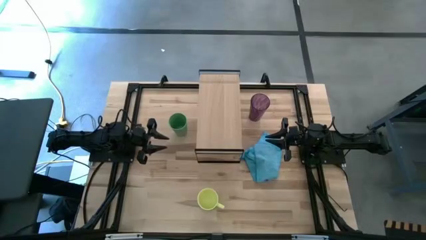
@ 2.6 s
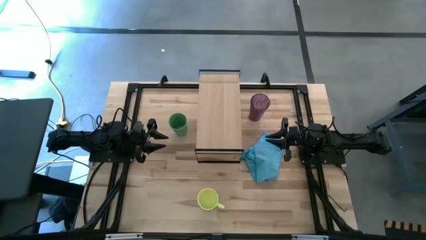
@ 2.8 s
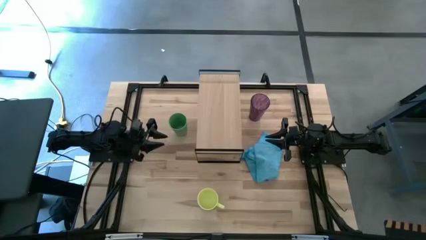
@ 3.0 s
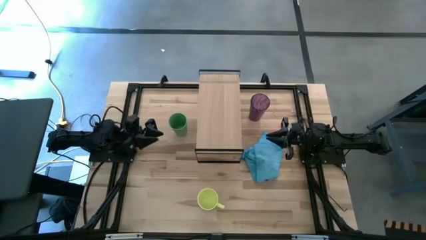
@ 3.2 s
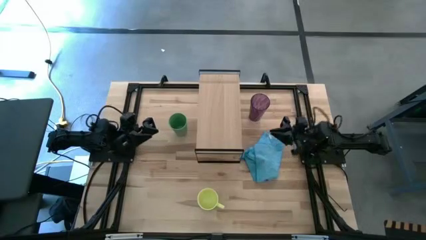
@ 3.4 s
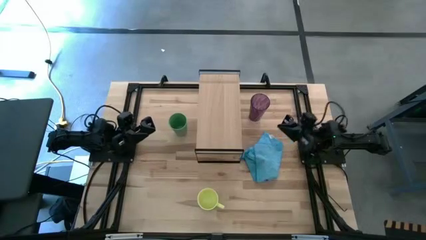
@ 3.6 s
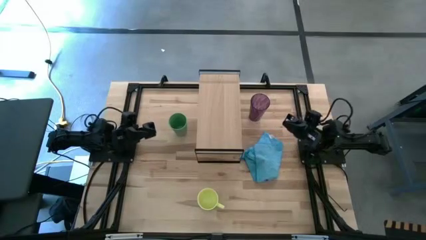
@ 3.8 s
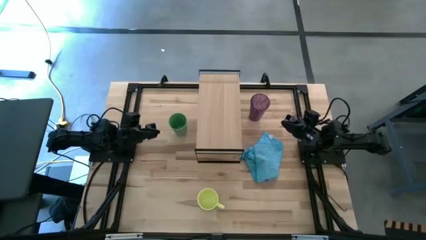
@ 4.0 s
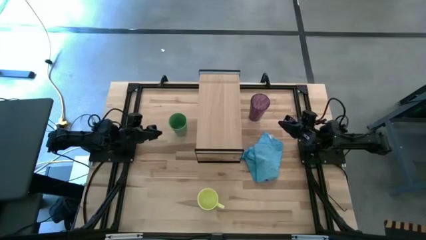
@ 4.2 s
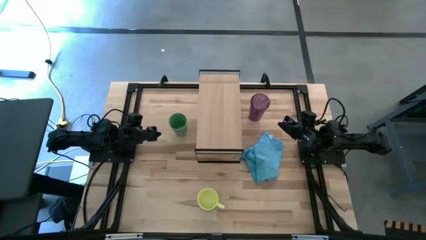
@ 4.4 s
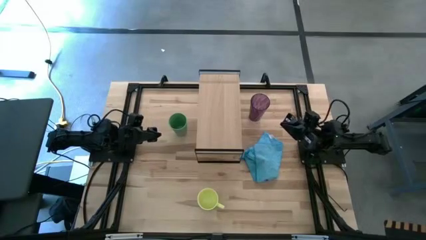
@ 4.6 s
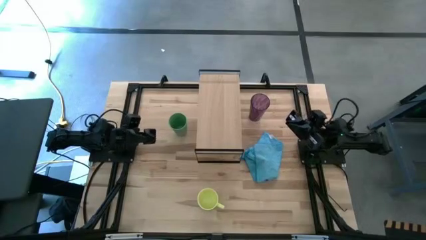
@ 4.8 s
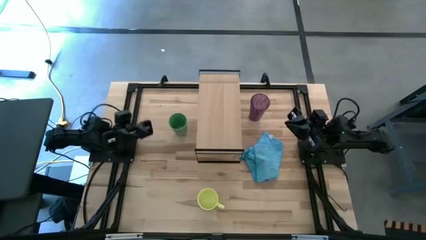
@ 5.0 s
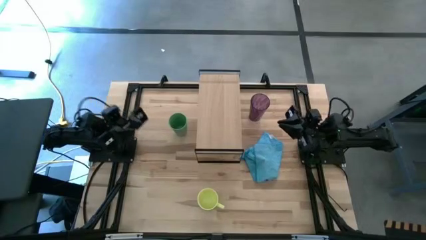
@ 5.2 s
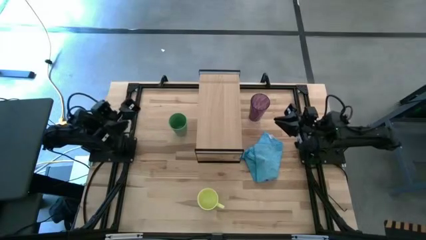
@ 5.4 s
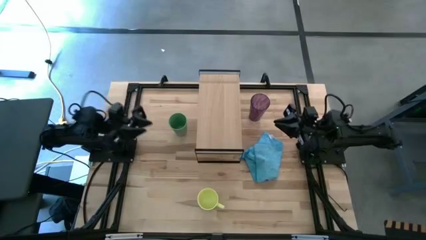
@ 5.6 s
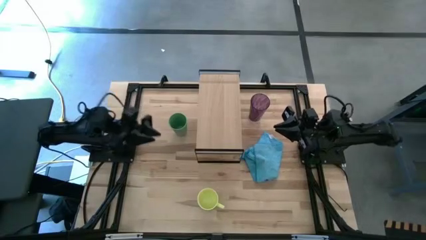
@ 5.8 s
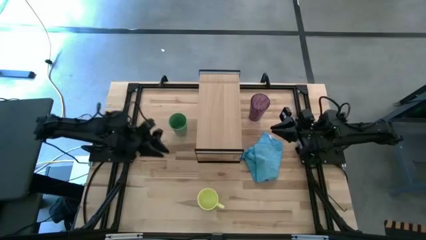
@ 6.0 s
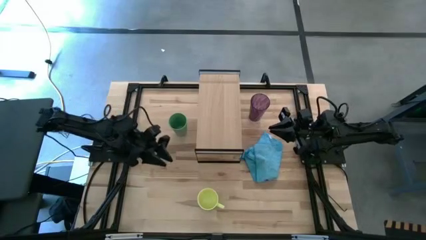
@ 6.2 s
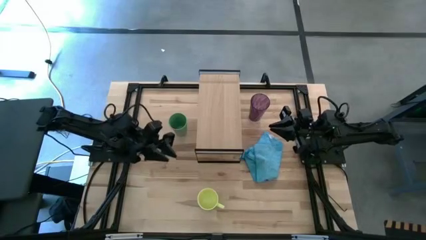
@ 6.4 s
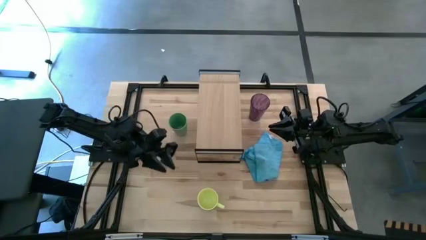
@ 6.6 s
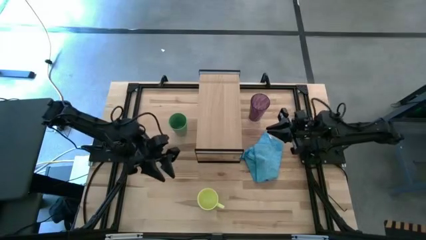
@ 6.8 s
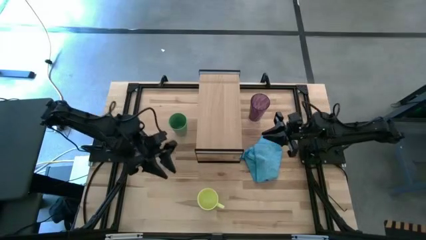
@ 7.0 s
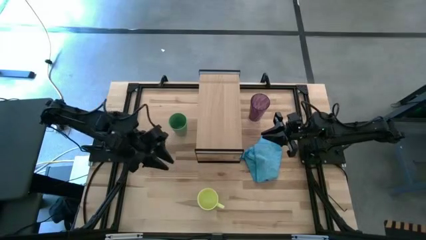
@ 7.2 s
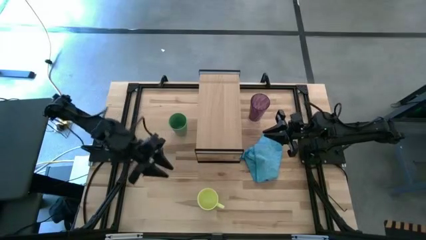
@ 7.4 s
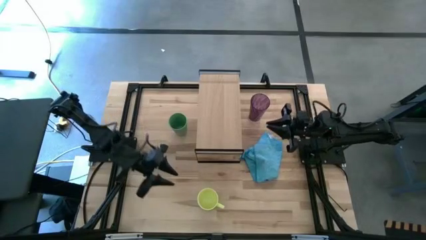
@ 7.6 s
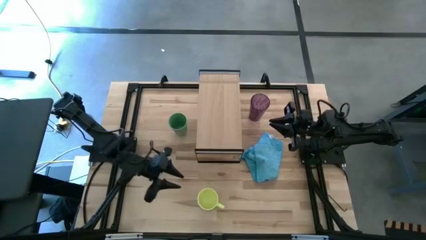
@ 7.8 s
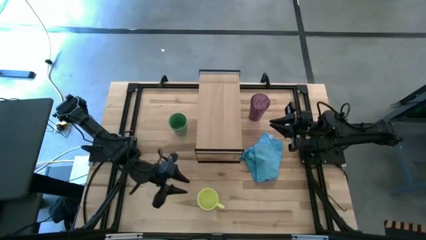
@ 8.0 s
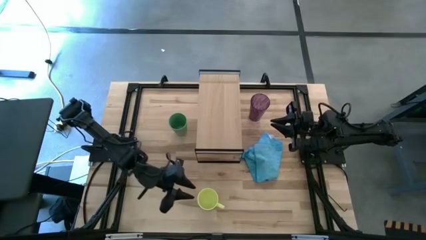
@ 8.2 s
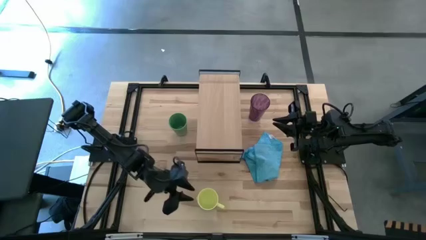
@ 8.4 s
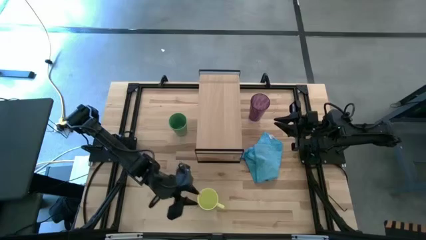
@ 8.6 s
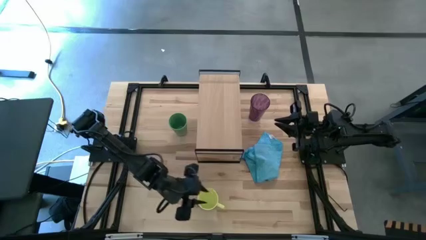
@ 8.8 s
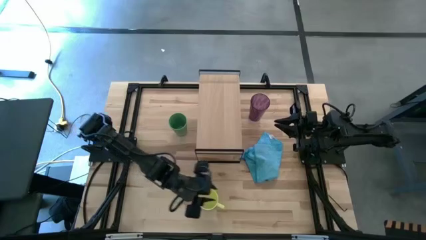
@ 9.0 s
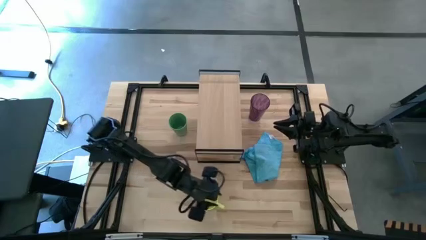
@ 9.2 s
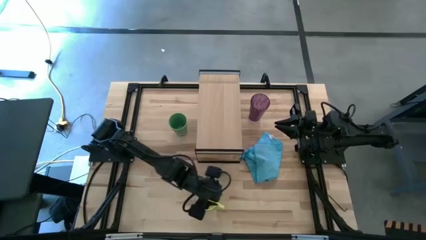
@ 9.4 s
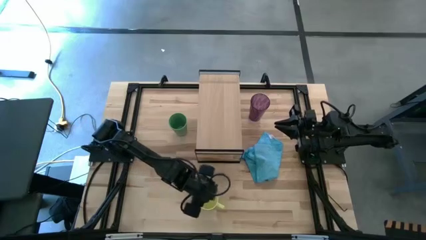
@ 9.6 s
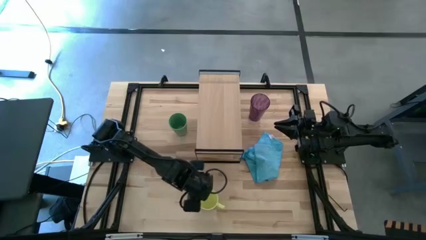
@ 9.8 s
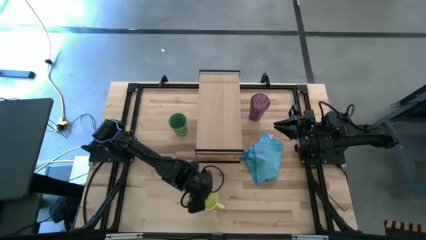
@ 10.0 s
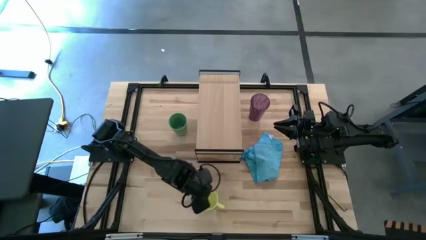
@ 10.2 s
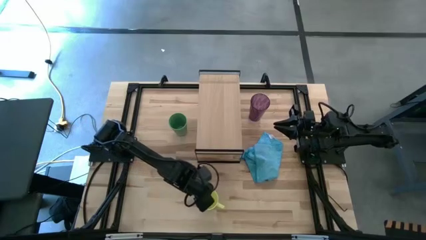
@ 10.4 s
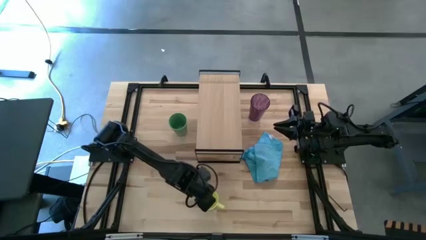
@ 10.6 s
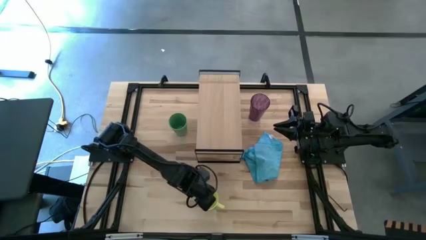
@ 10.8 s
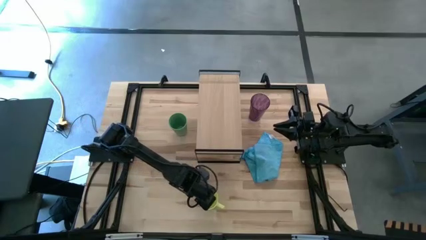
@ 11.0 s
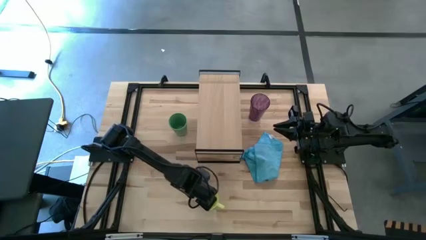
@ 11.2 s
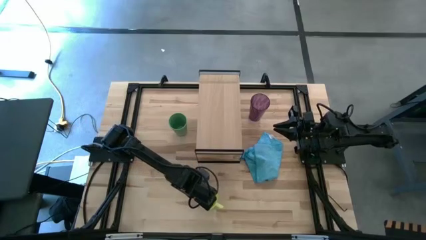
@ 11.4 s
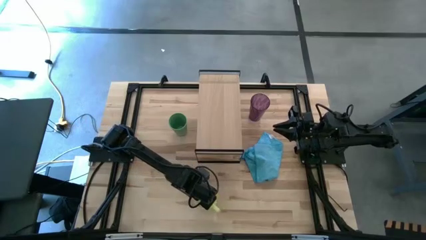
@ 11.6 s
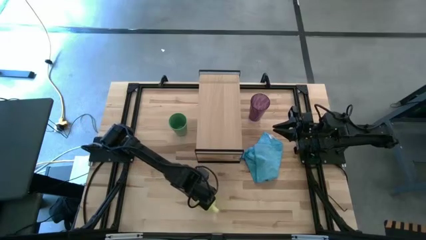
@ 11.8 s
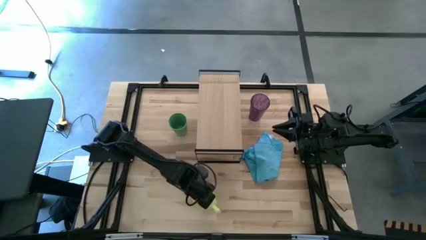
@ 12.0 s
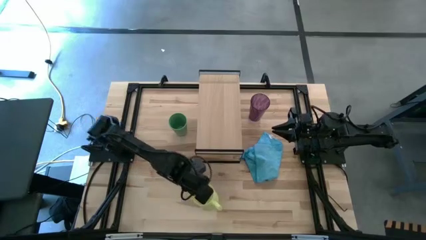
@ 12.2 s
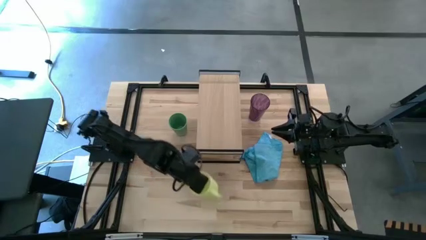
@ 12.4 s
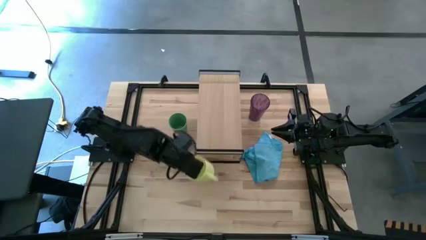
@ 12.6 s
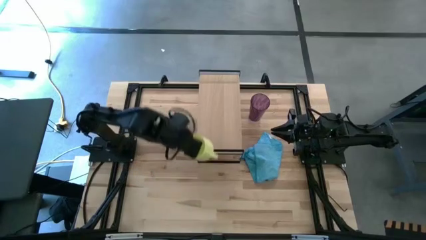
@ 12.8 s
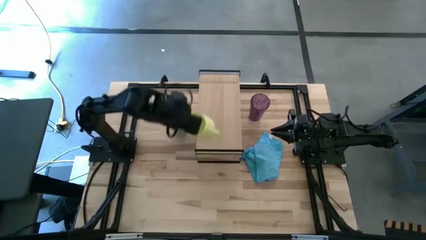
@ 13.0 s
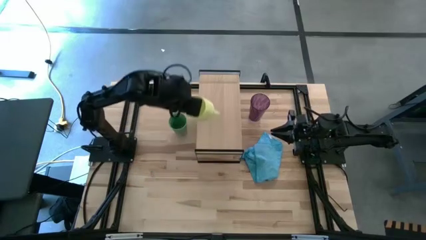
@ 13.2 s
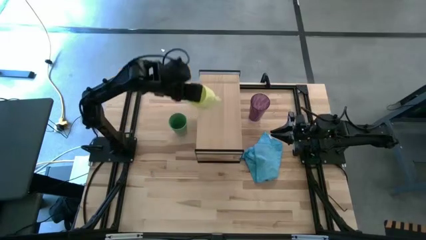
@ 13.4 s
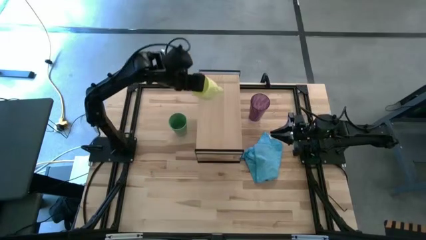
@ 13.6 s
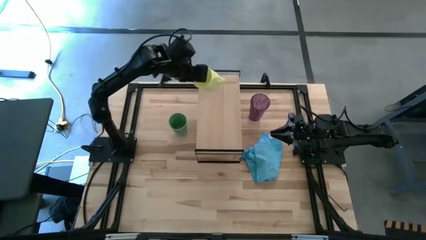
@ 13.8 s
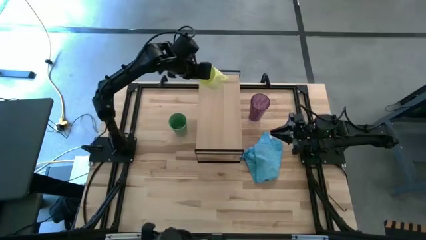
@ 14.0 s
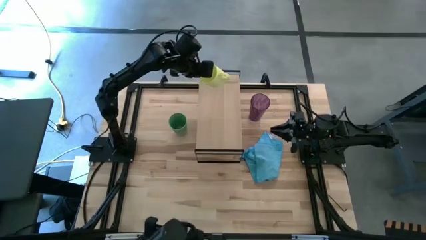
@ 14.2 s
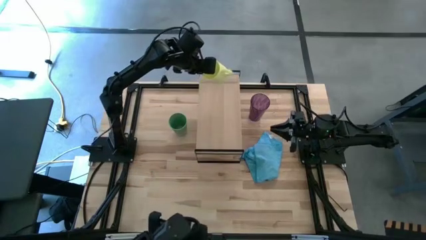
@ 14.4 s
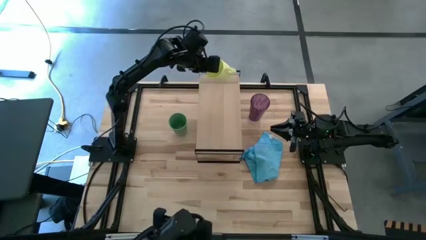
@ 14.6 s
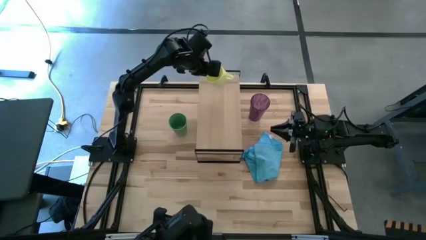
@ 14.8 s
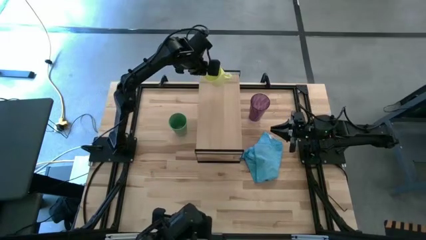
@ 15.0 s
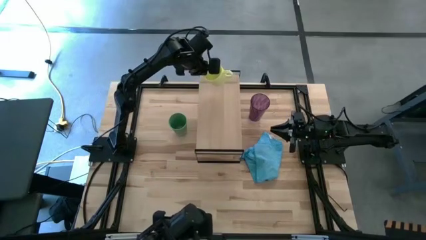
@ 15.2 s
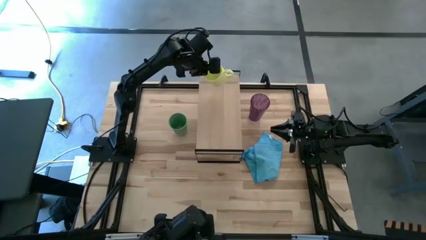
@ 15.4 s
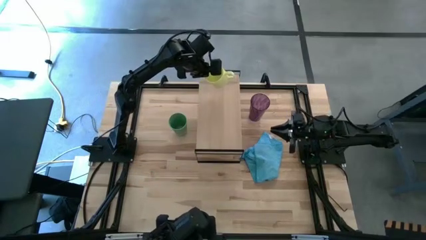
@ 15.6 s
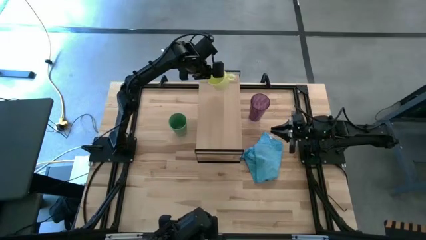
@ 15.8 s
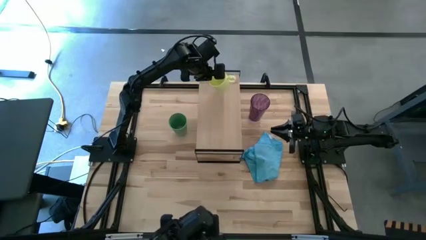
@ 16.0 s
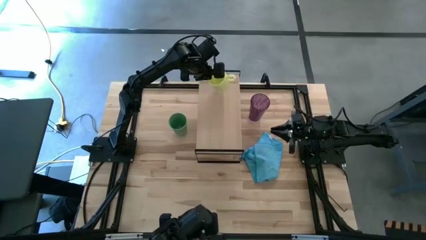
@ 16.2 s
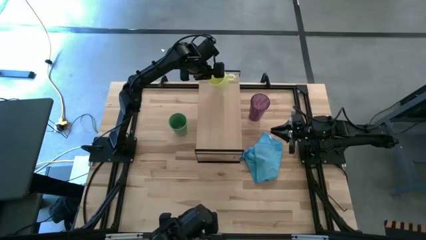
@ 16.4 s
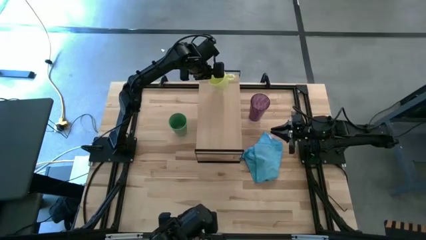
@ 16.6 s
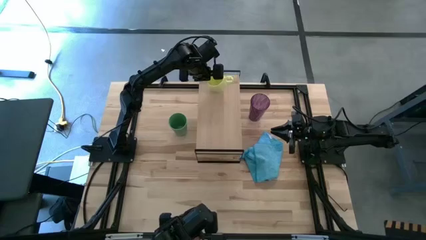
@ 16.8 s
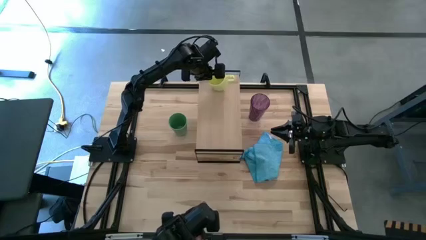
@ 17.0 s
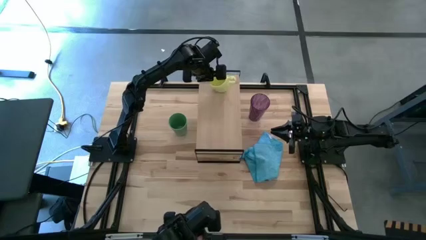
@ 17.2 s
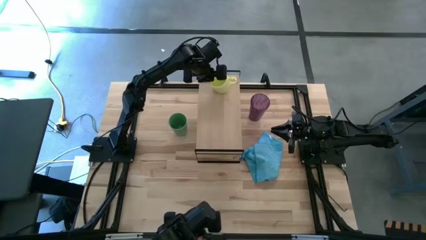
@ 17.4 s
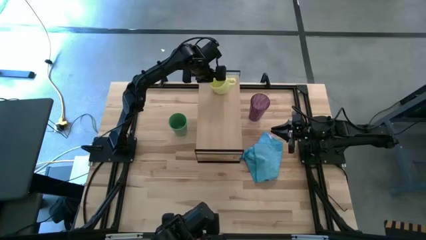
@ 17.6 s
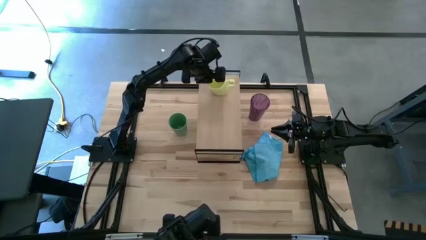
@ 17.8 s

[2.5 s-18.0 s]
Task: Stack small to large cups/mugs on shelf
Put the yellow mug on the shelf
